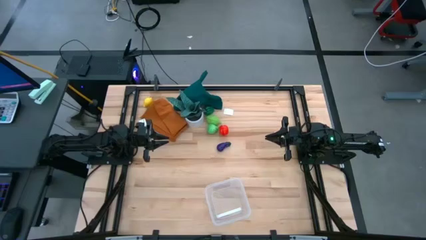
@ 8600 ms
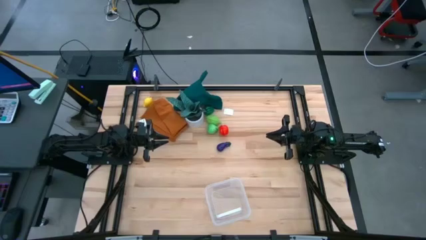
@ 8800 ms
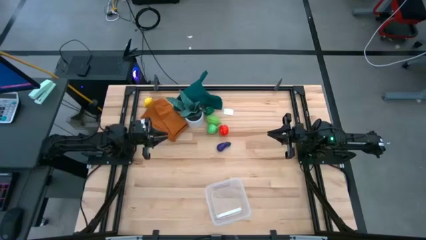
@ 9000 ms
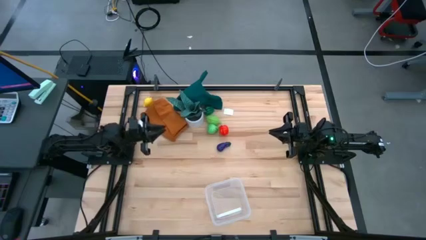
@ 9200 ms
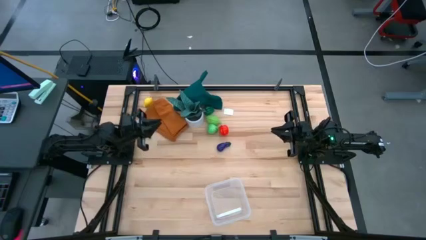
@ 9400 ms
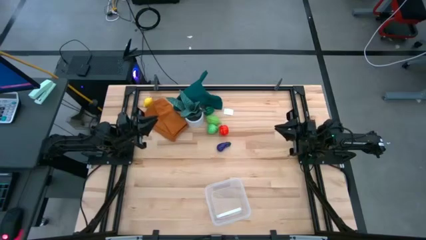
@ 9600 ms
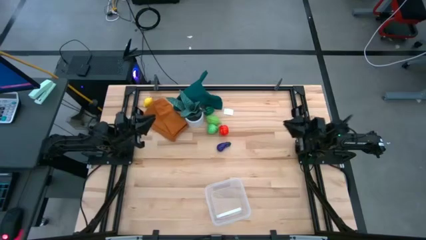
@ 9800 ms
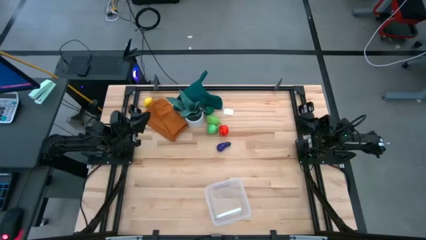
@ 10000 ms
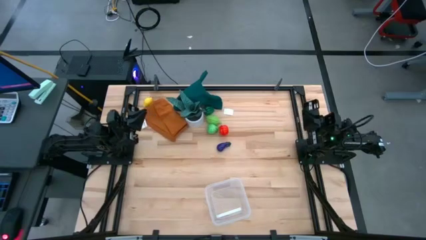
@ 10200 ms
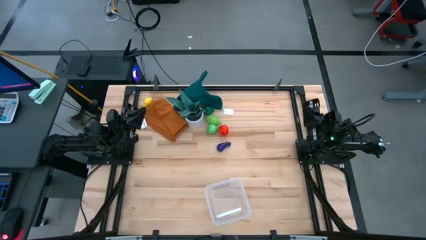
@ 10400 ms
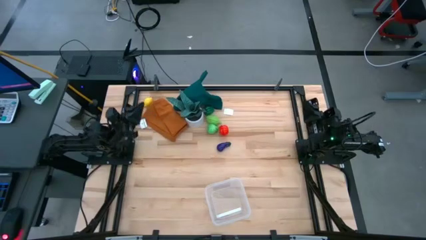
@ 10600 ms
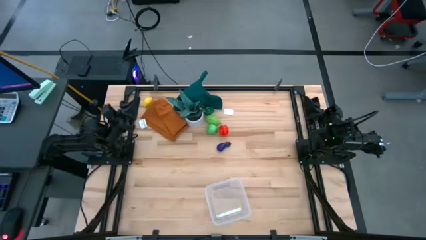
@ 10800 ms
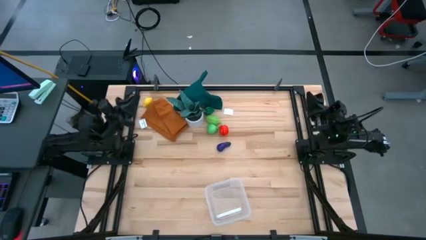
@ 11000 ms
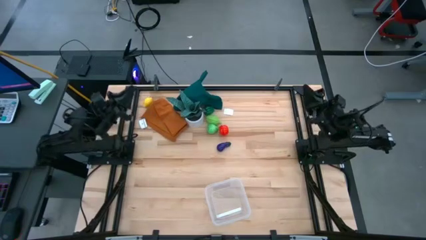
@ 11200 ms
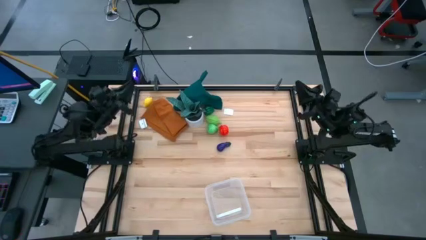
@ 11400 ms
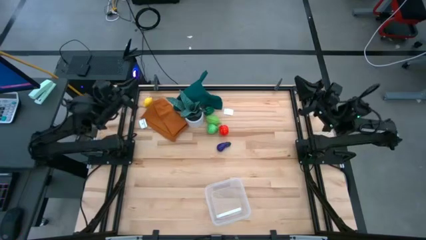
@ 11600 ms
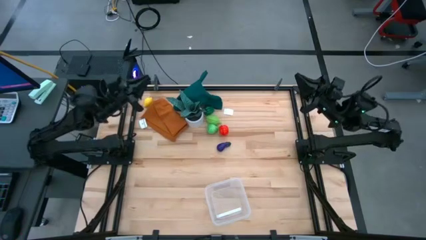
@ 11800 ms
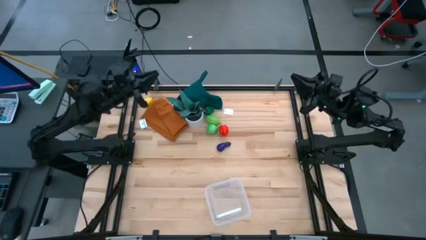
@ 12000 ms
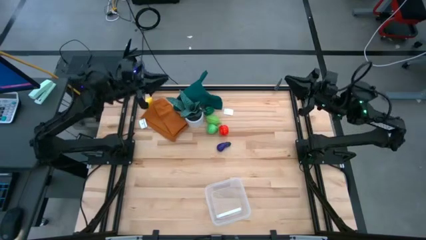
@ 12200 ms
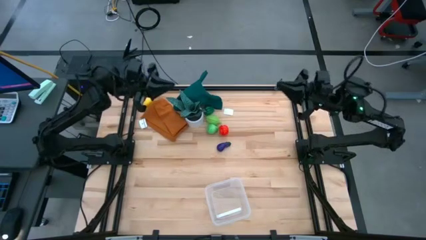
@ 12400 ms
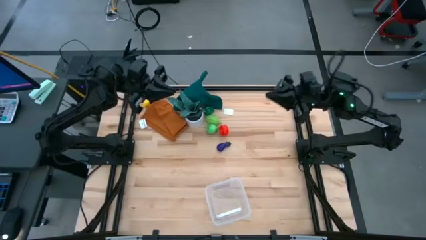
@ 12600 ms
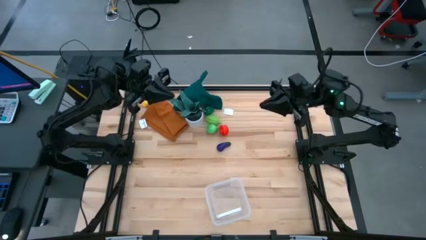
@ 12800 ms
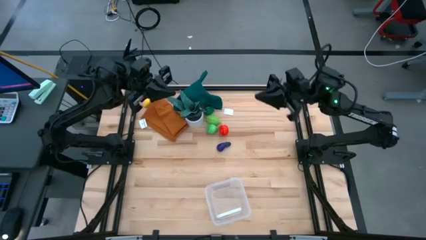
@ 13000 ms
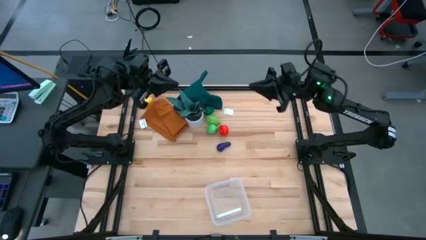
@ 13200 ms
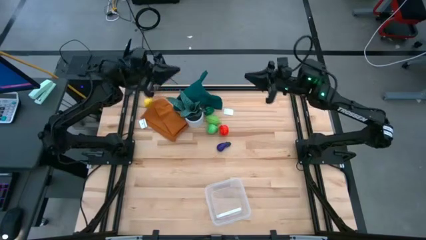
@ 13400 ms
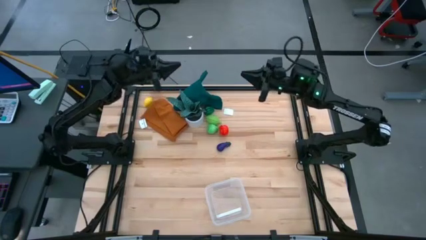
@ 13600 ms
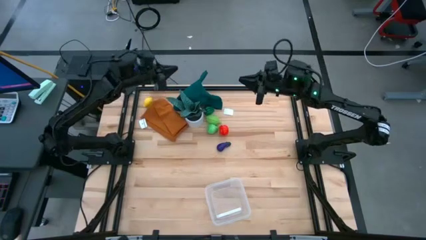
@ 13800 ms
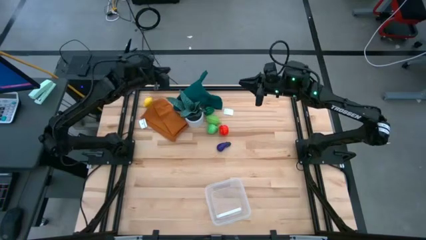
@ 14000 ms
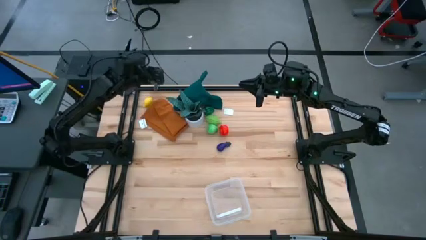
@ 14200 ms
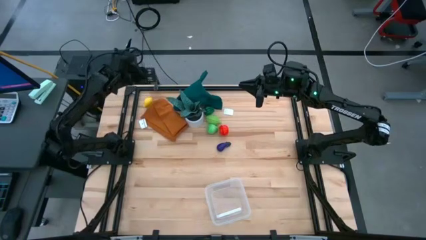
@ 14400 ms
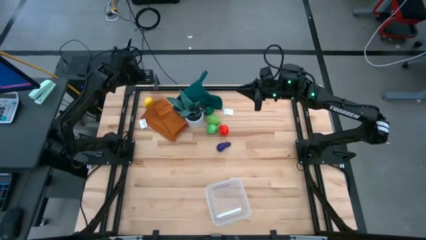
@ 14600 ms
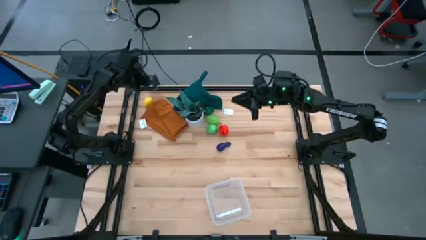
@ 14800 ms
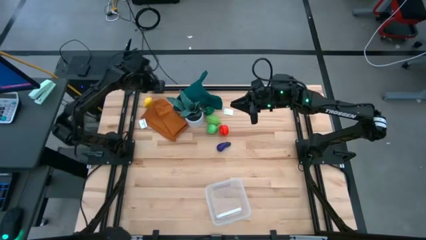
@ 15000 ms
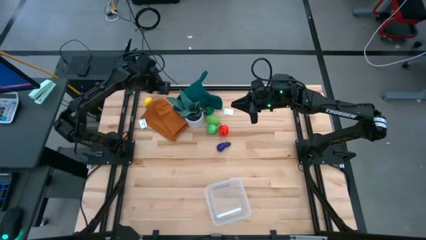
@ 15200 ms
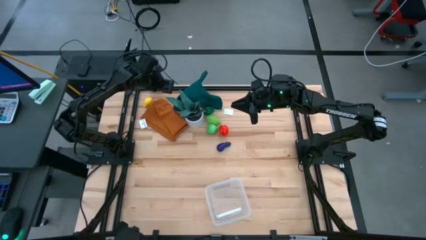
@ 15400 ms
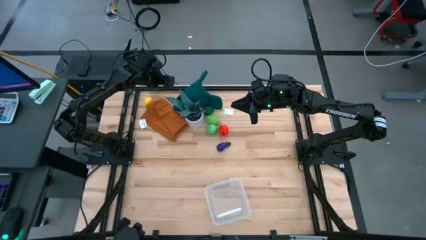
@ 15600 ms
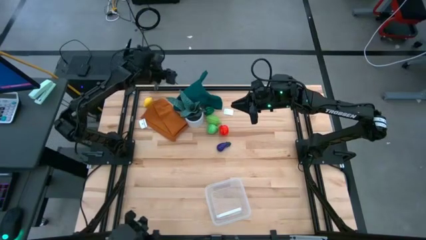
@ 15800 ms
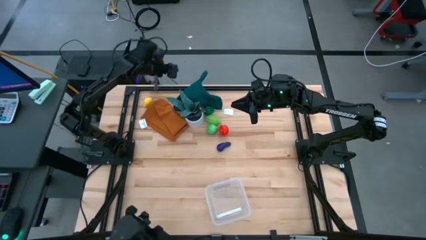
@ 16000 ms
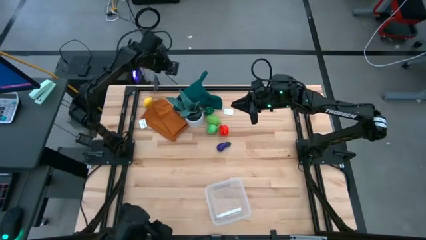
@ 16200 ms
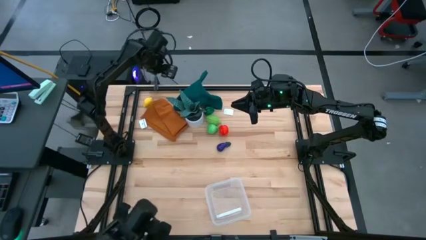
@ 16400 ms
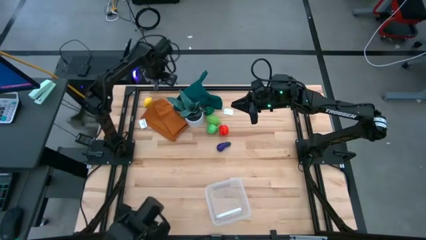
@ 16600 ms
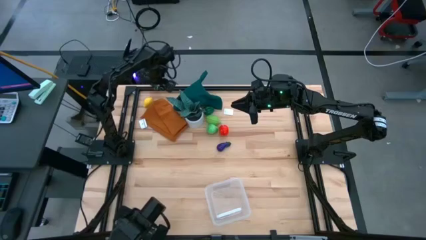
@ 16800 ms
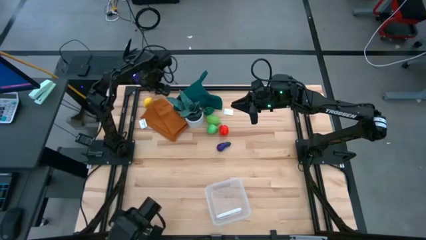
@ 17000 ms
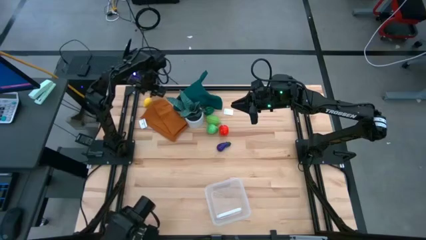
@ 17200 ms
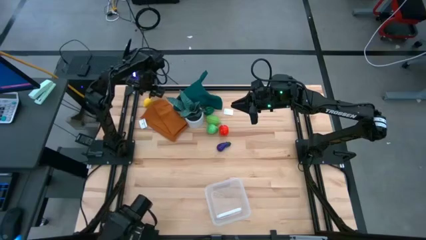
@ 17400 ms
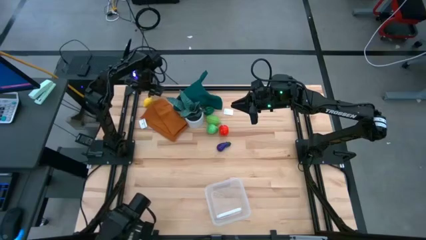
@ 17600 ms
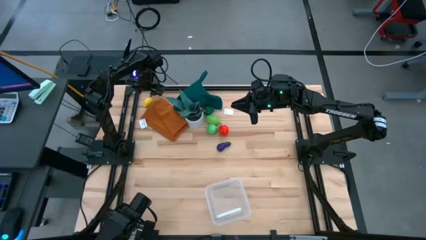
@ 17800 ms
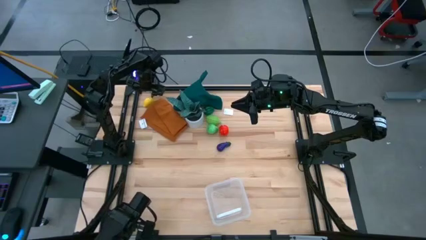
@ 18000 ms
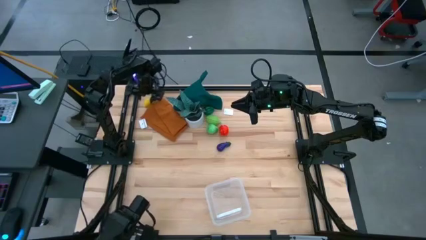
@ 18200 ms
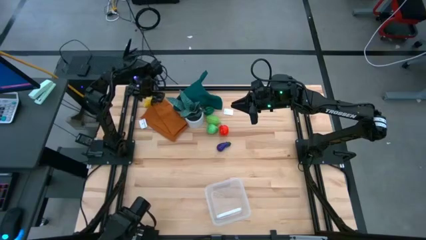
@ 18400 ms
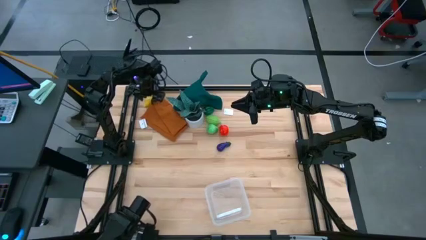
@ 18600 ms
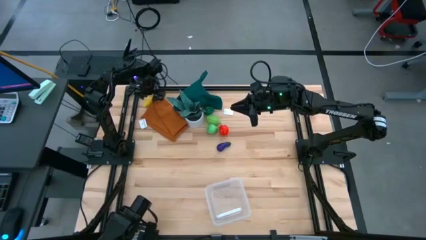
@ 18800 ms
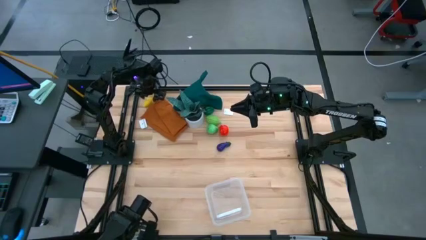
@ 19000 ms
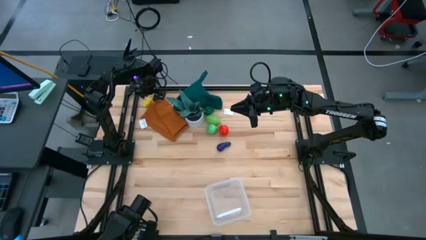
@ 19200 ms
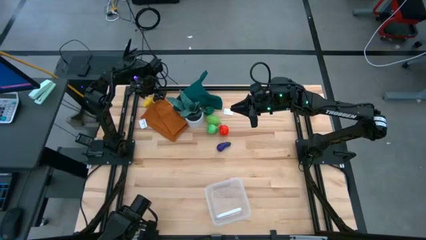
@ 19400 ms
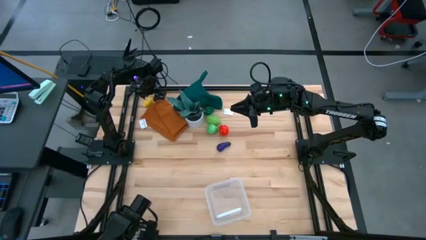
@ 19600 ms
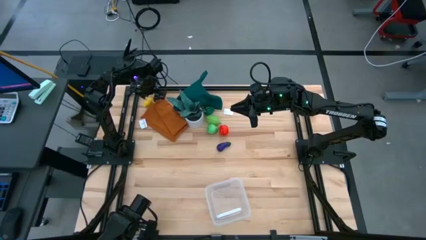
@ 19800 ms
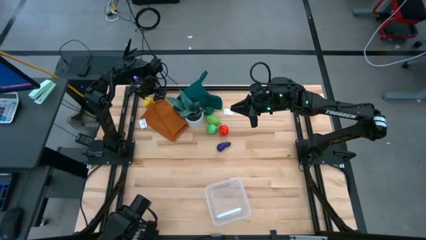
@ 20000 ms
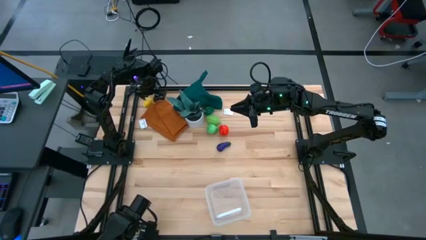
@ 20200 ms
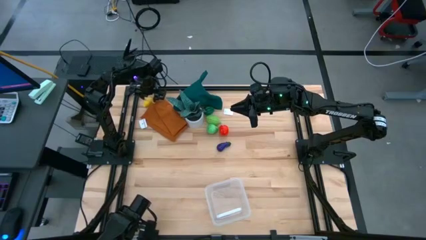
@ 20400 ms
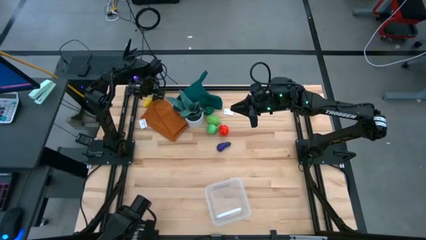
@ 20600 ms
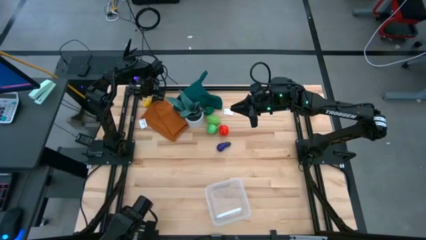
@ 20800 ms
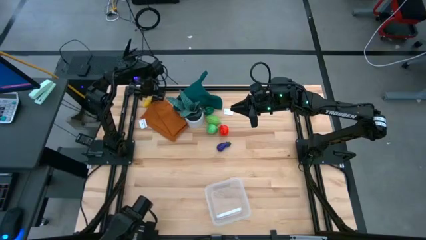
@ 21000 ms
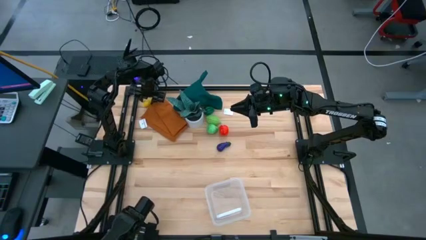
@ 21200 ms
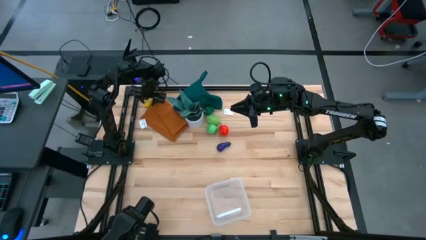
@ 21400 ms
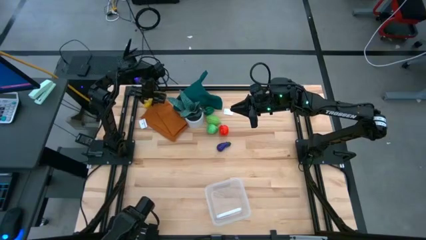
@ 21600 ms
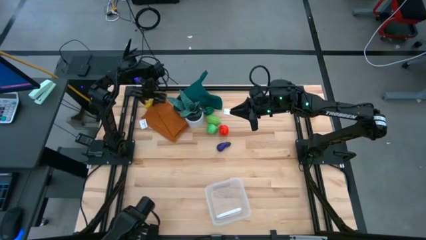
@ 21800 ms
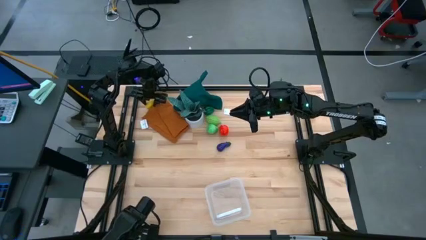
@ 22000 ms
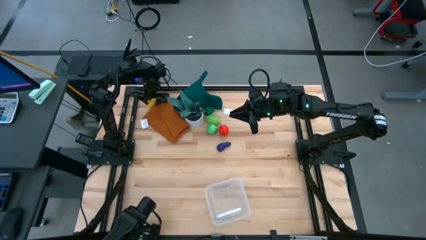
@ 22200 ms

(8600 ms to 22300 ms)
Task: Pick and placing Produce into tupperware
Put the lemon into the transparent bin
